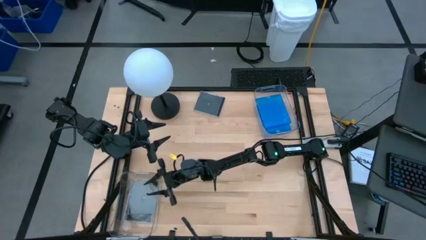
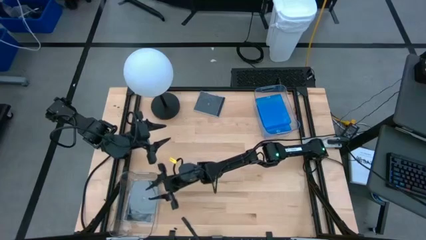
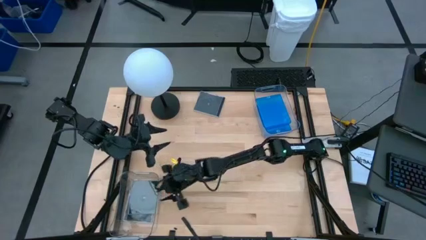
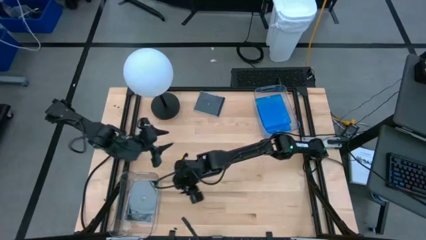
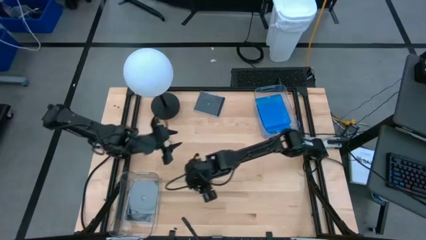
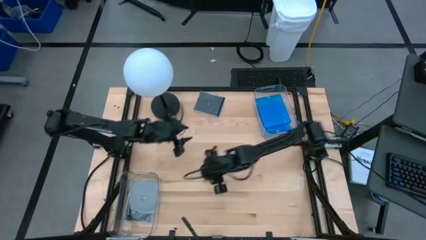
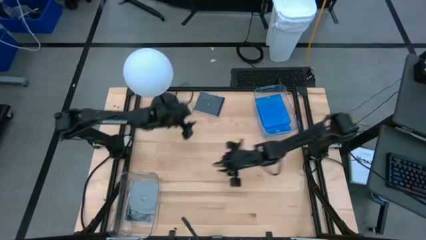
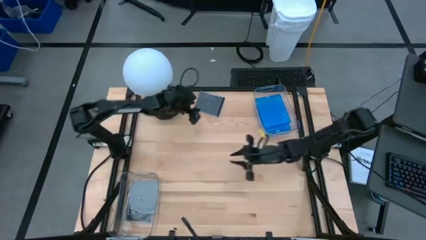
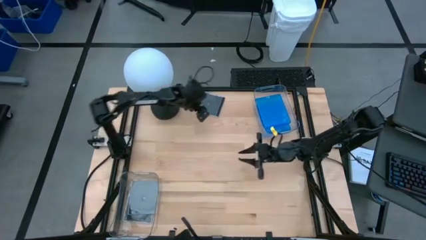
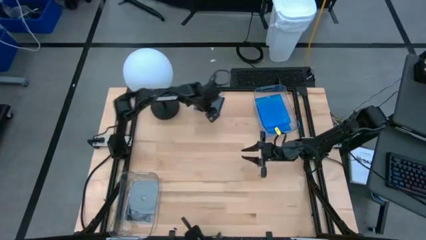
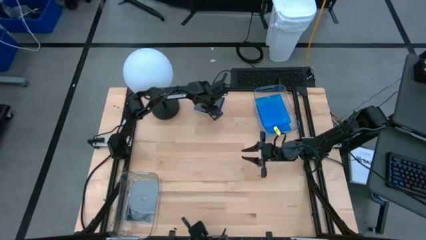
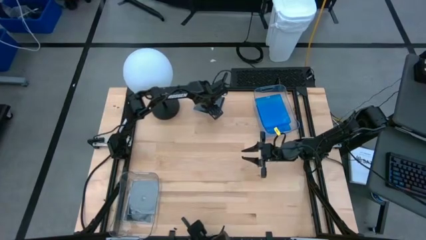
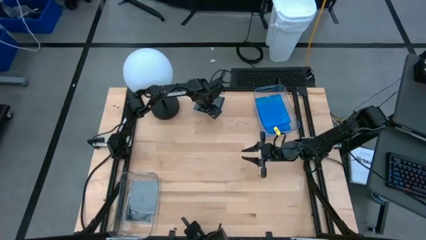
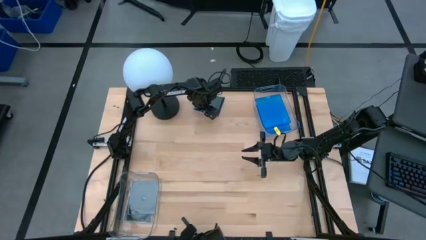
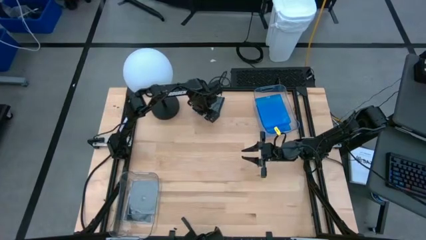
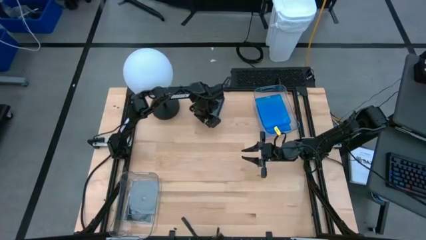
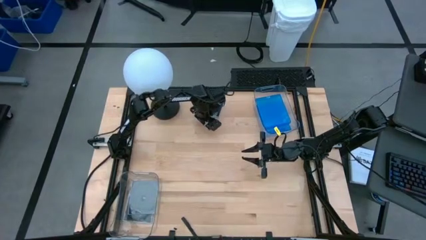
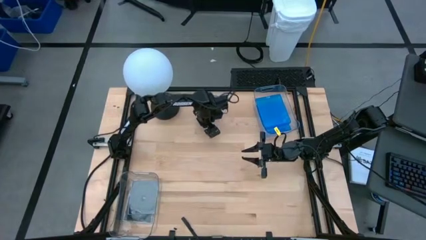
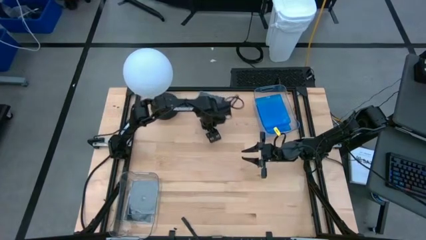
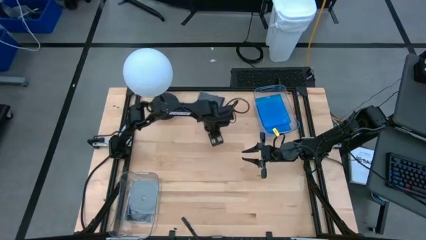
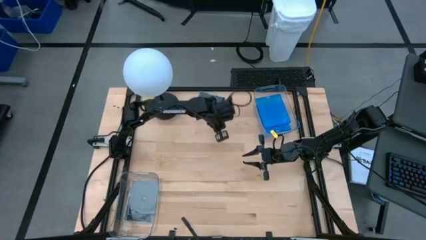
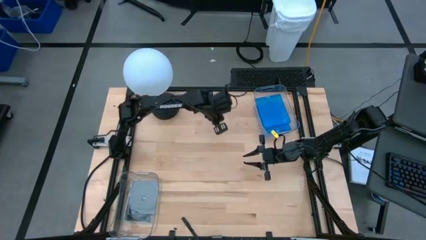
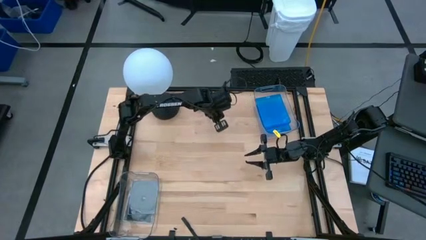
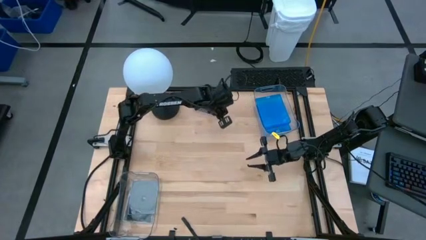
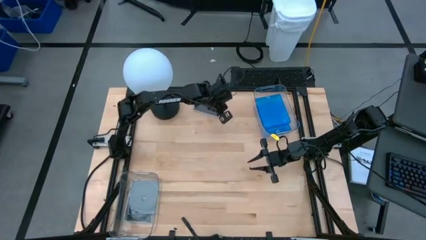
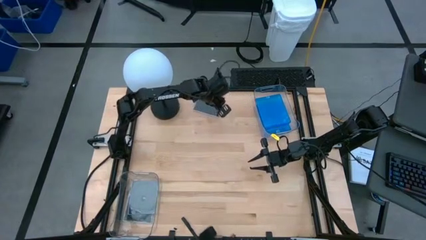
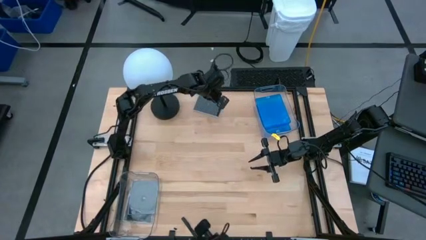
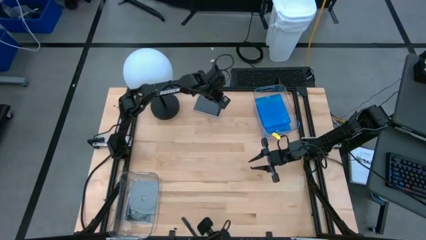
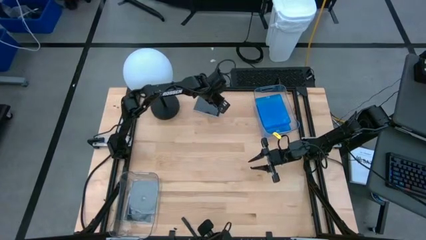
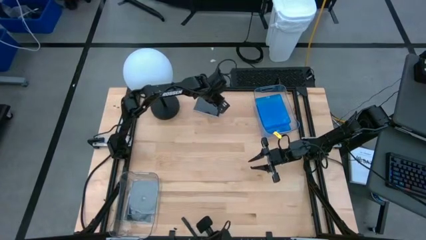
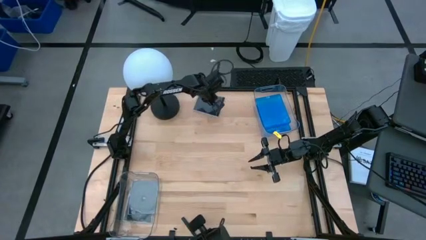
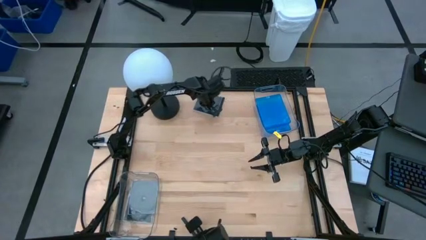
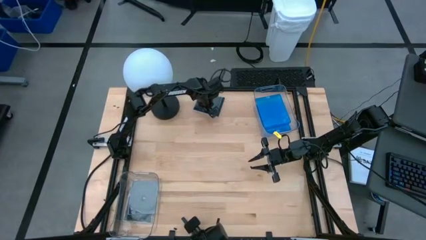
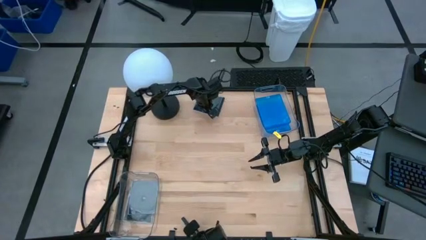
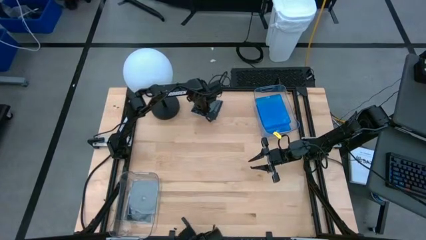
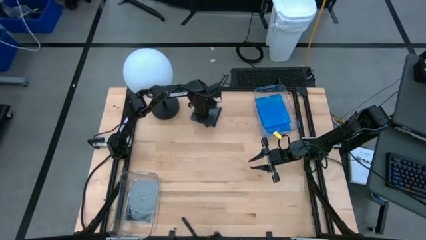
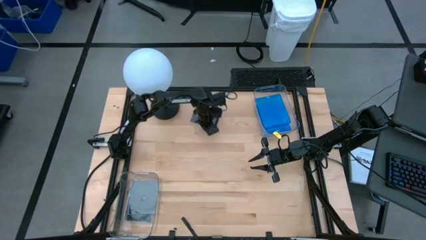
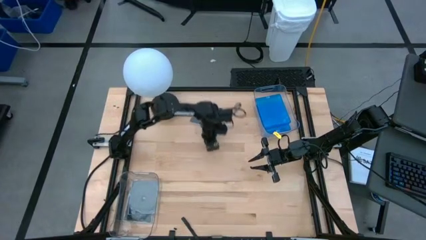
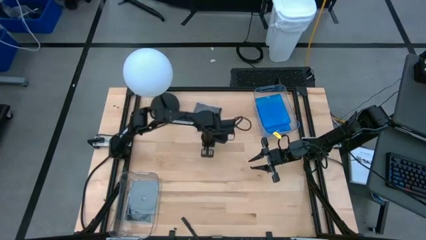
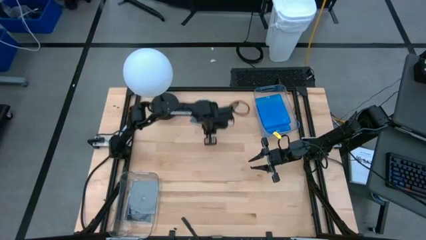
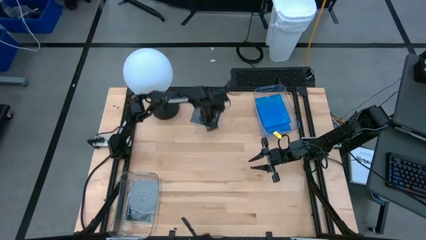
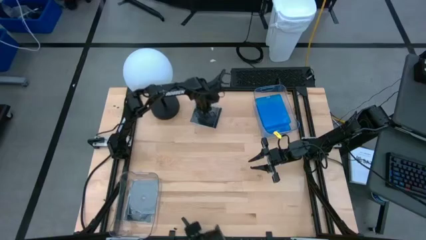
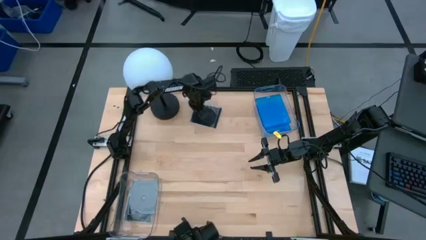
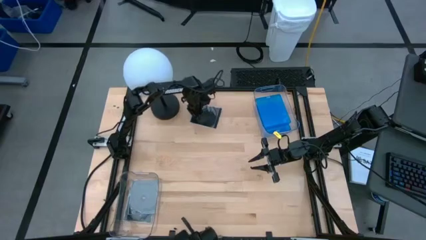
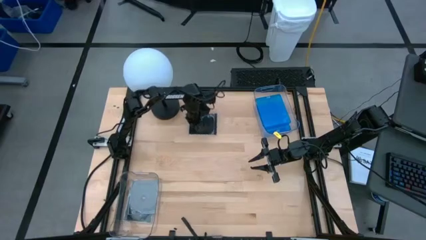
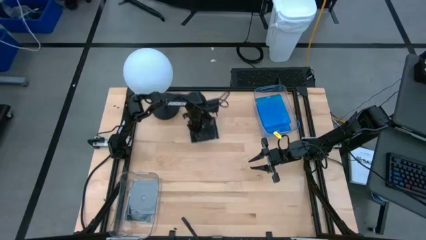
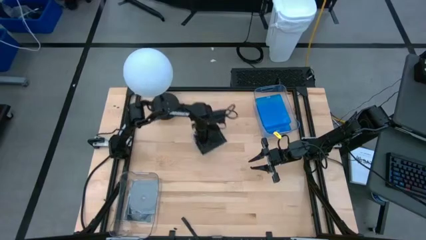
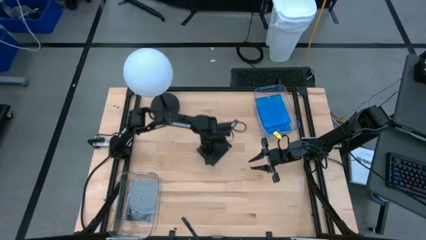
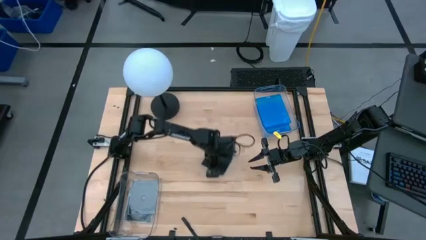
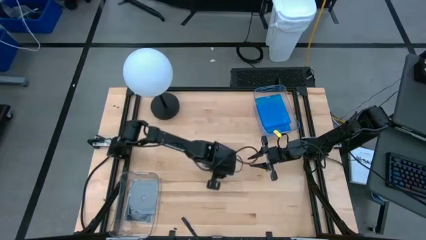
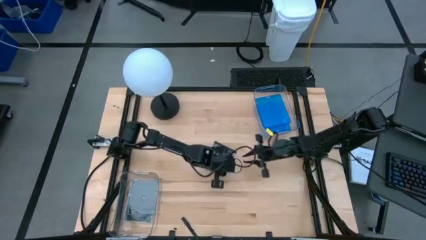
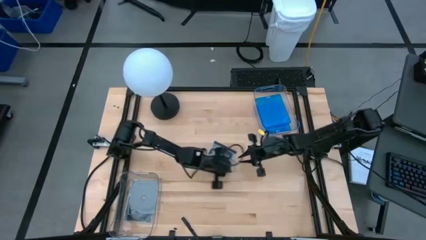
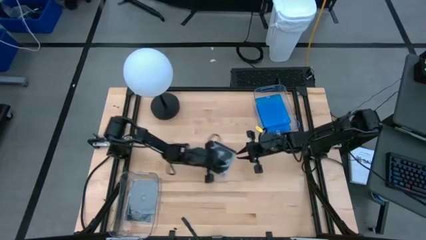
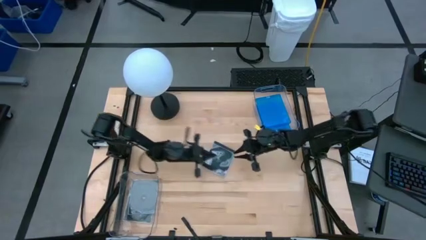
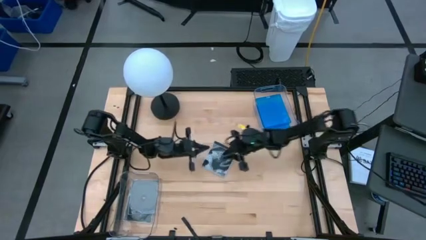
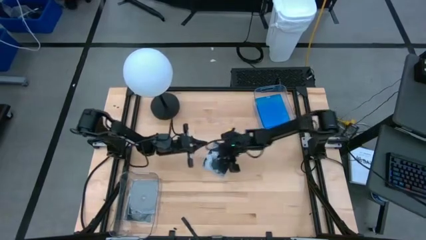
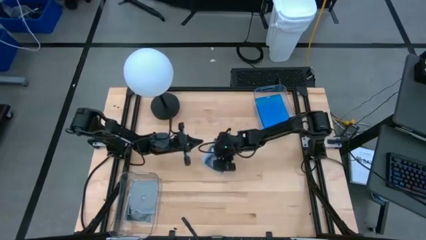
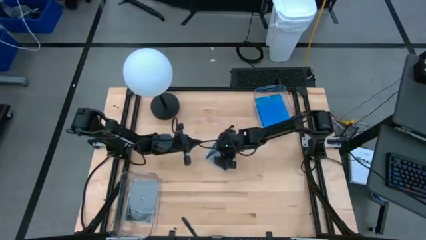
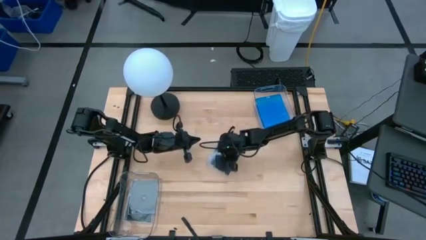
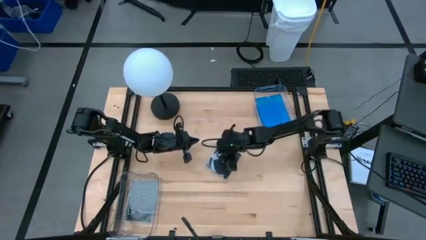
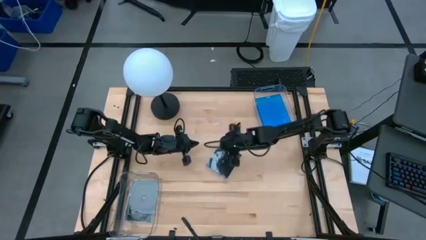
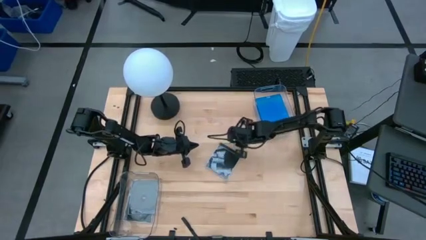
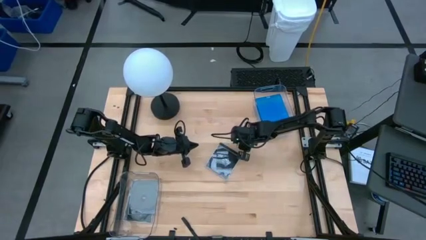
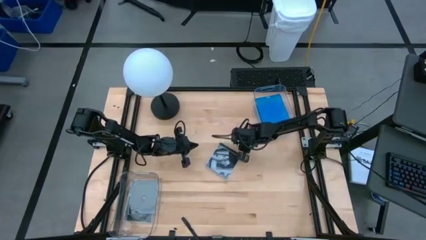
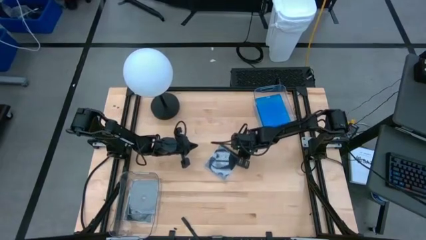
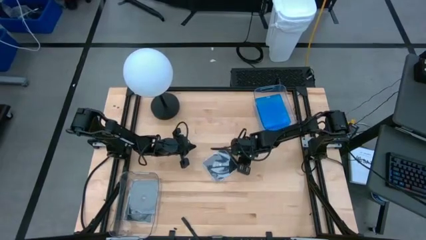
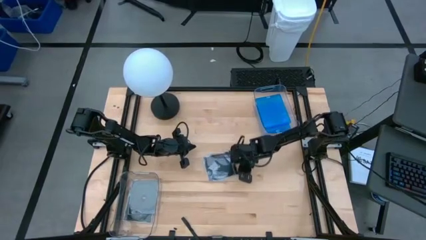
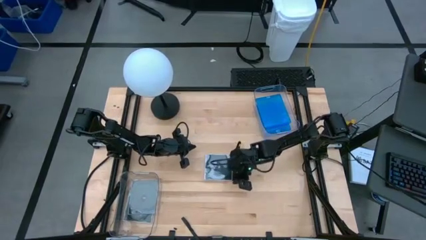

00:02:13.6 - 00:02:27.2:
Task: Pick & place jewel cases by type
Put the bottom black CD case into the bottom transparent bin

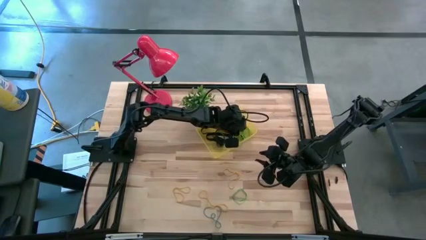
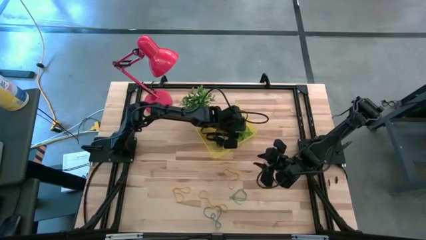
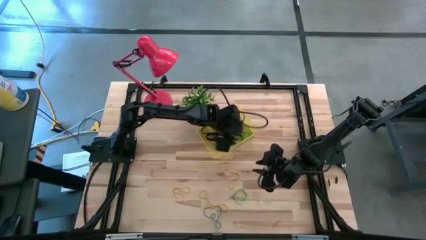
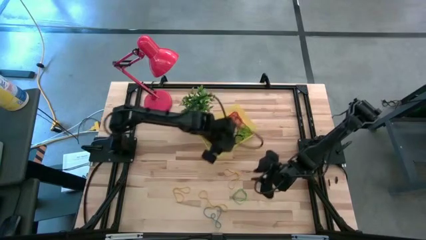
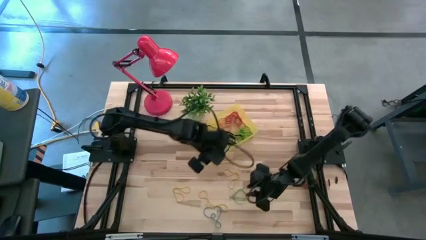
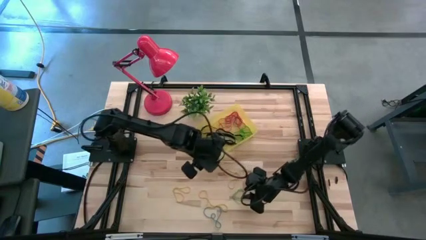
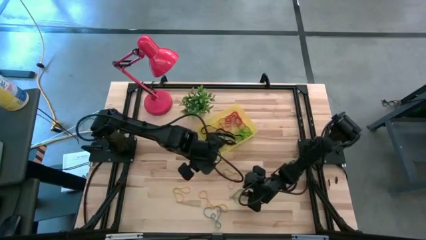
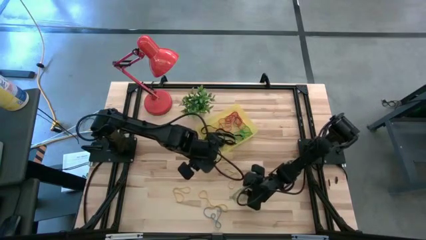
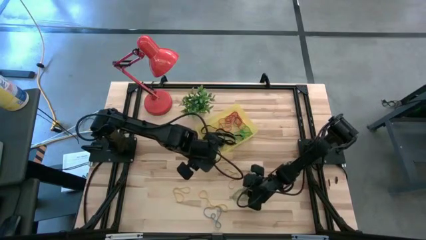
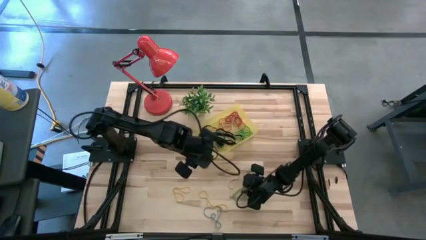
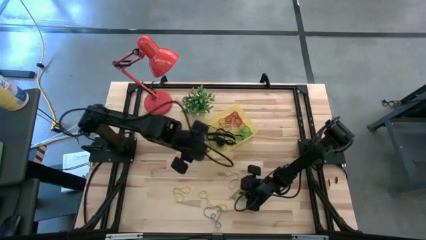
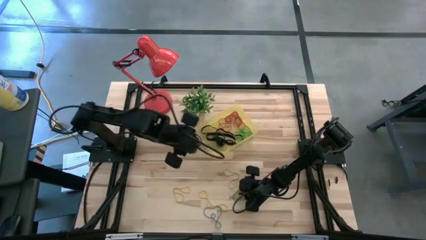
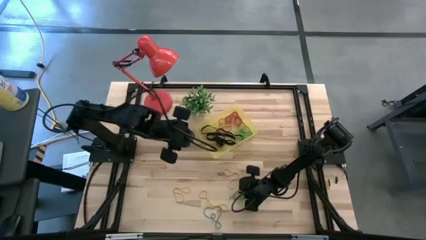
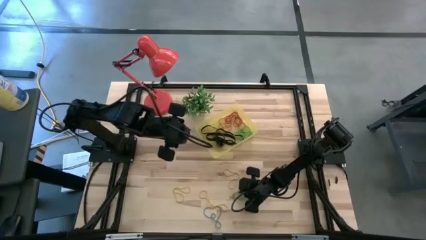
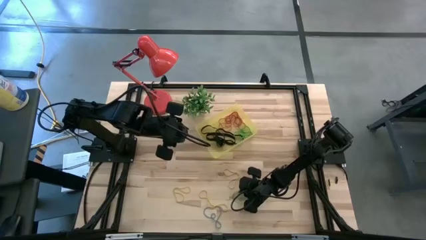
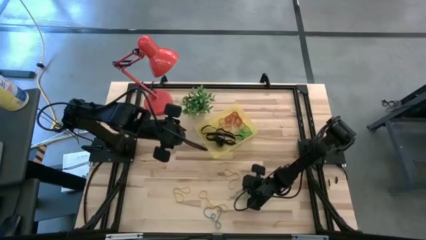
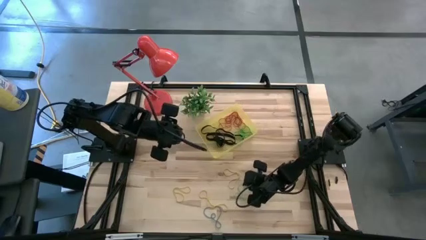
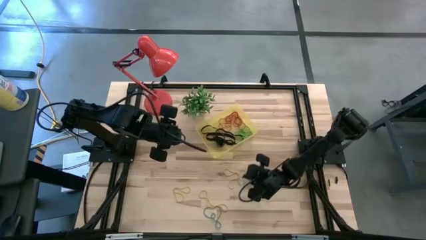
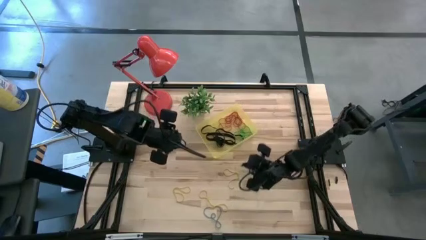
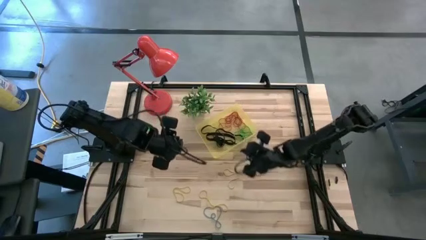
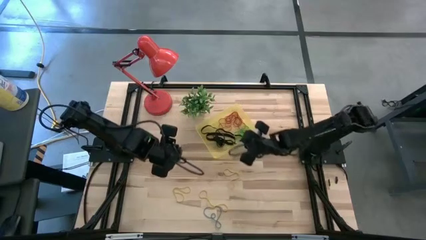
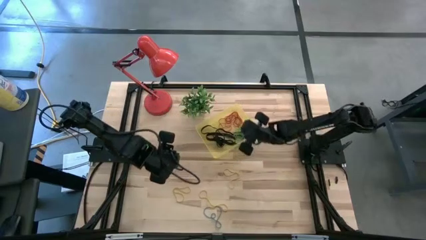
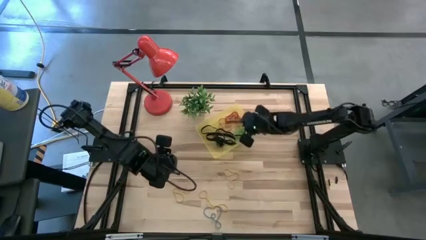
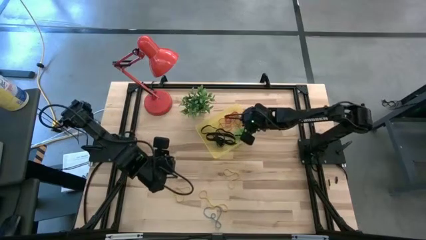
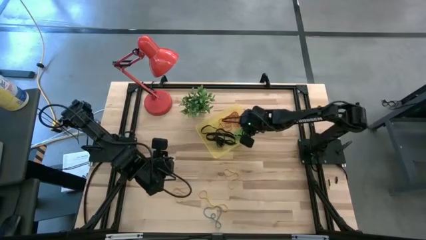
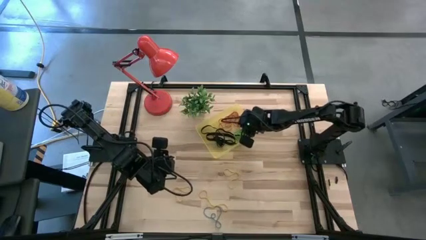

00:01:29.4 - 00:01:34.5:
Task: Pick and place rubber bands into bin
Put the green rubber band into the transparent yellow bin
